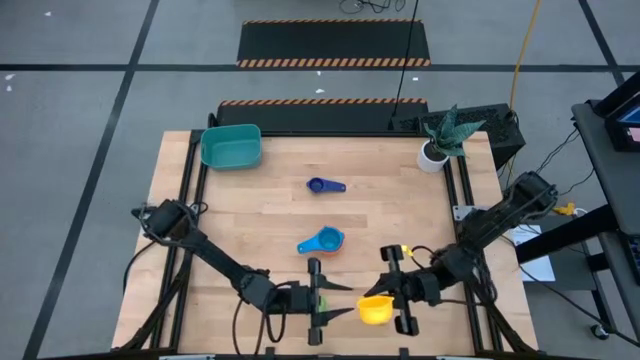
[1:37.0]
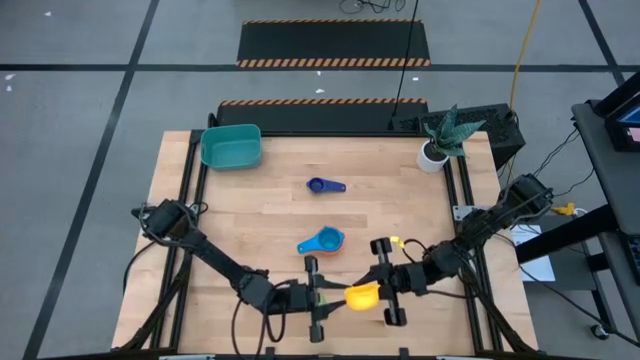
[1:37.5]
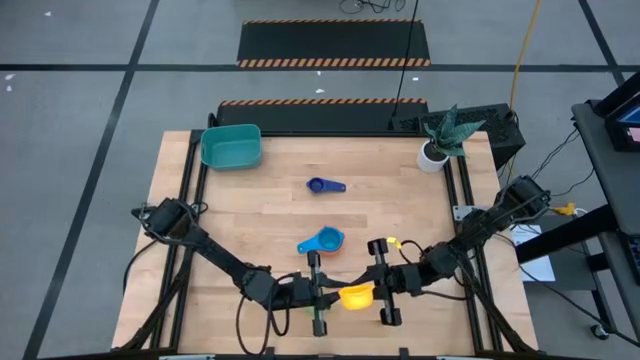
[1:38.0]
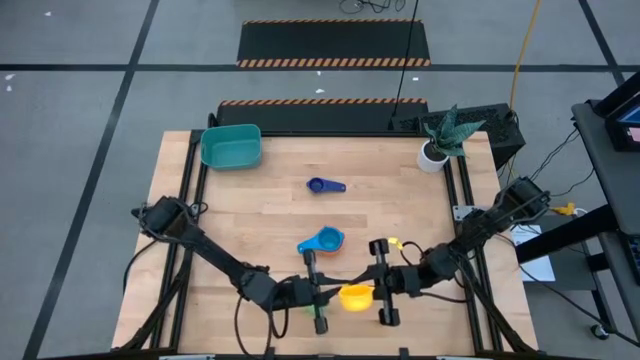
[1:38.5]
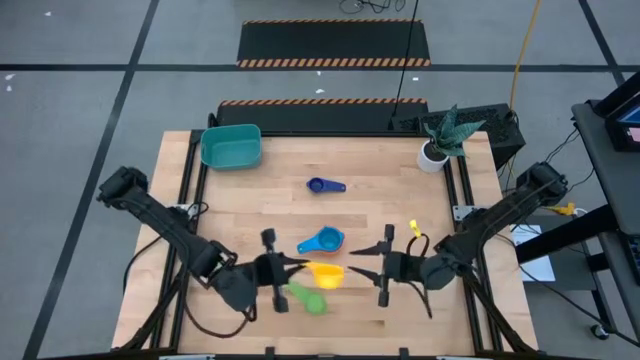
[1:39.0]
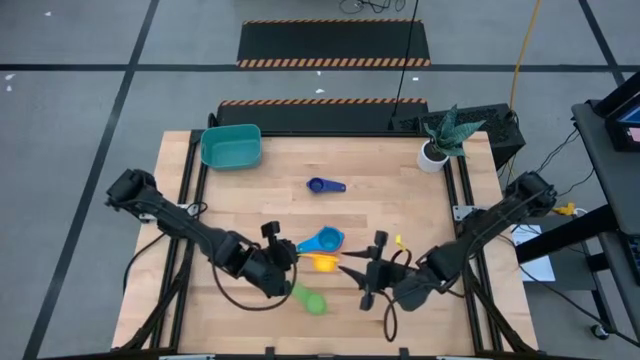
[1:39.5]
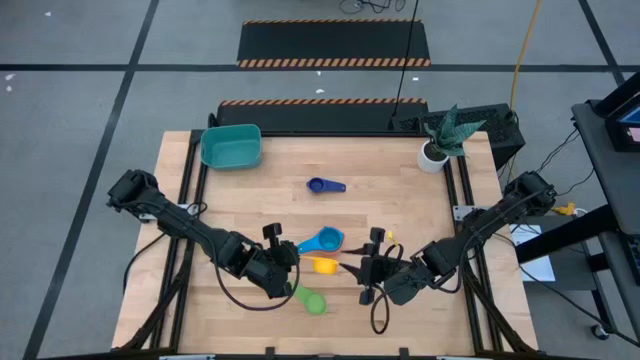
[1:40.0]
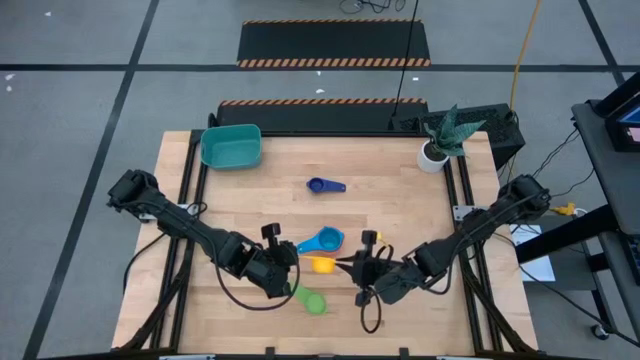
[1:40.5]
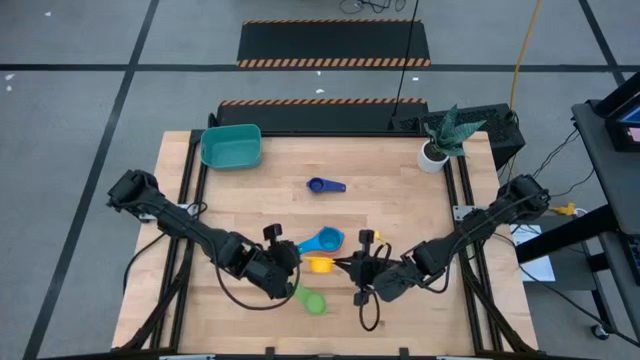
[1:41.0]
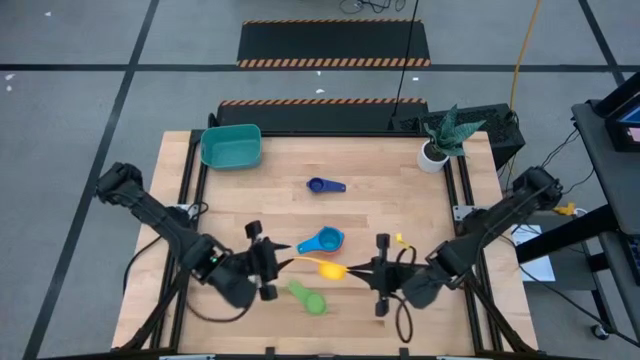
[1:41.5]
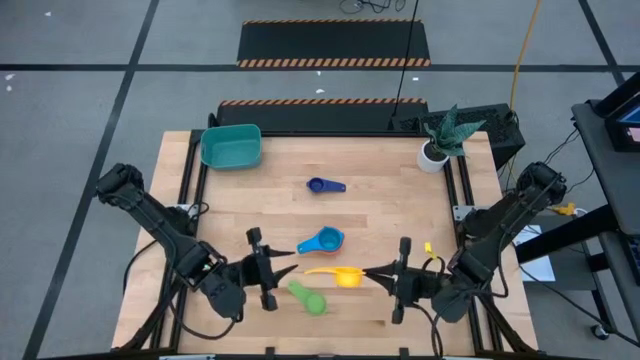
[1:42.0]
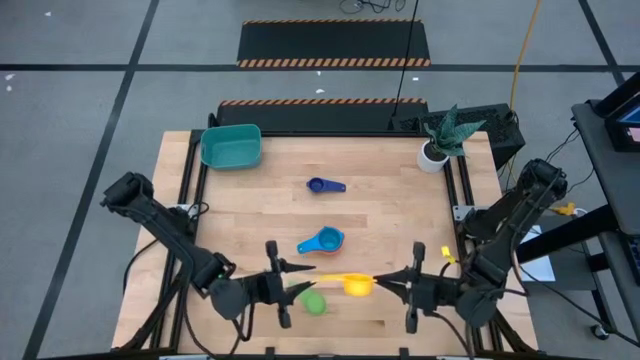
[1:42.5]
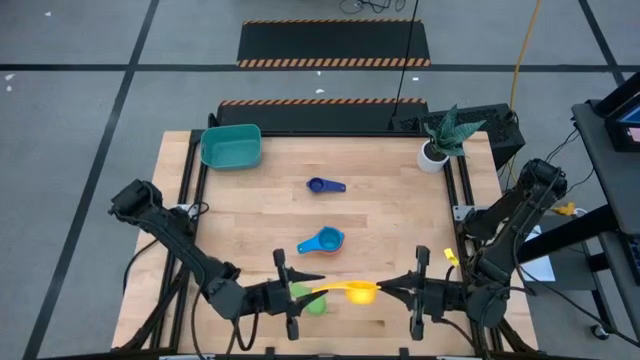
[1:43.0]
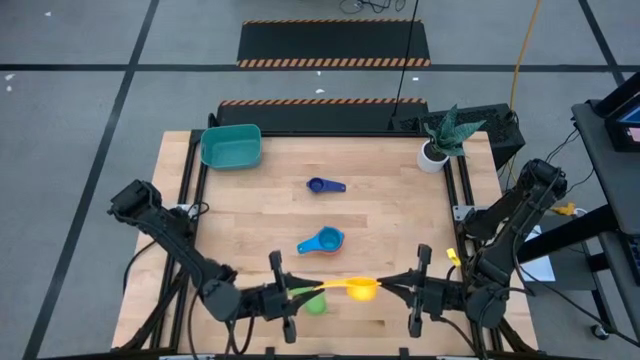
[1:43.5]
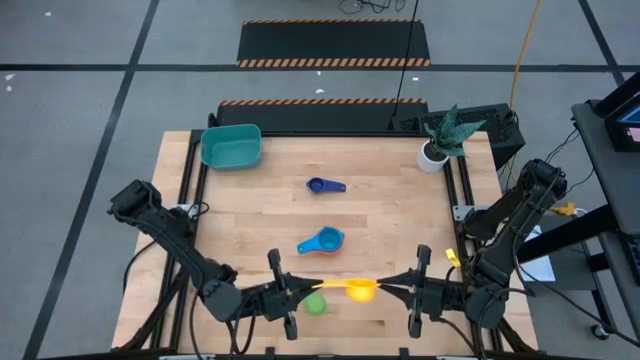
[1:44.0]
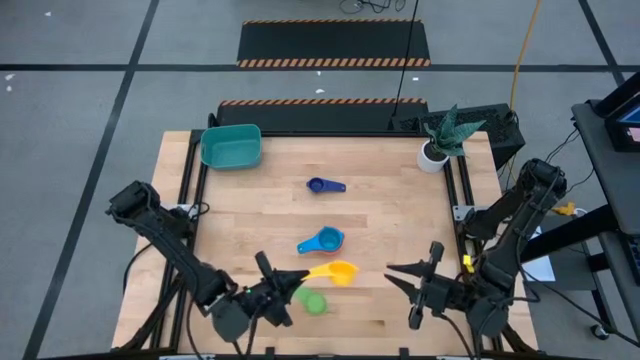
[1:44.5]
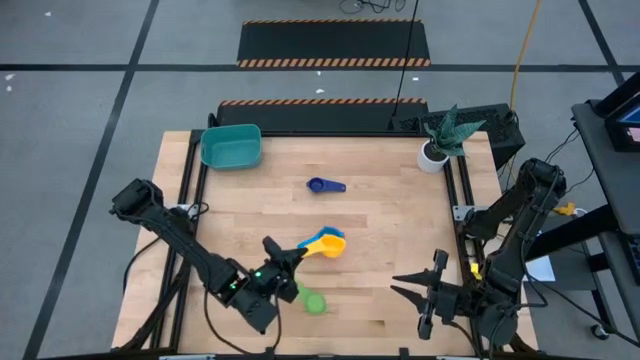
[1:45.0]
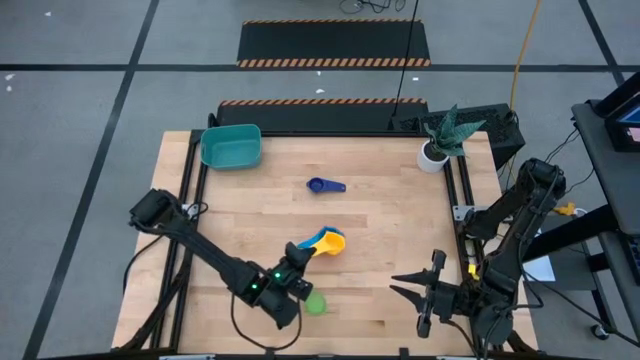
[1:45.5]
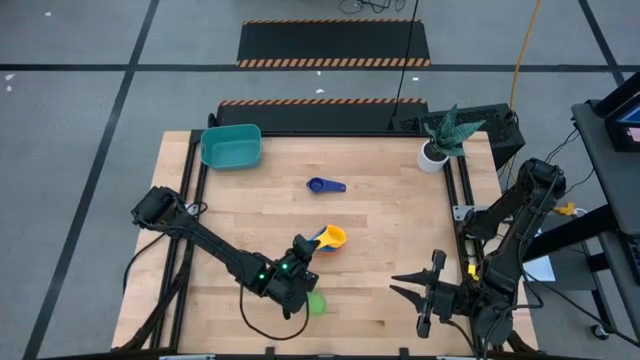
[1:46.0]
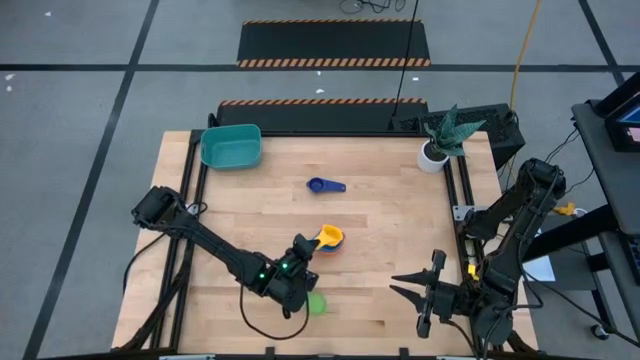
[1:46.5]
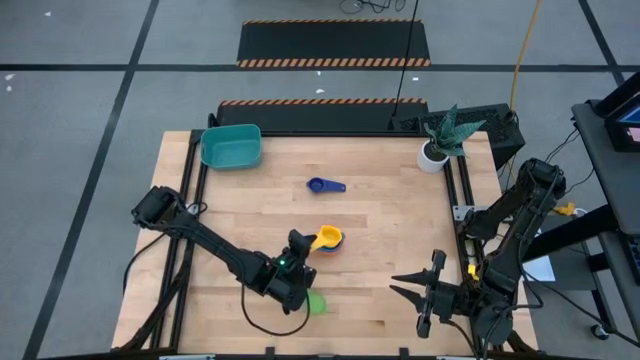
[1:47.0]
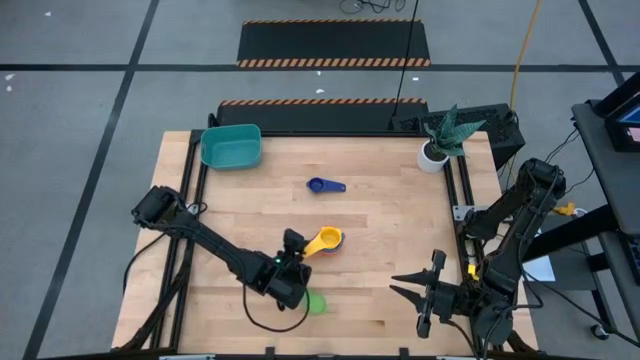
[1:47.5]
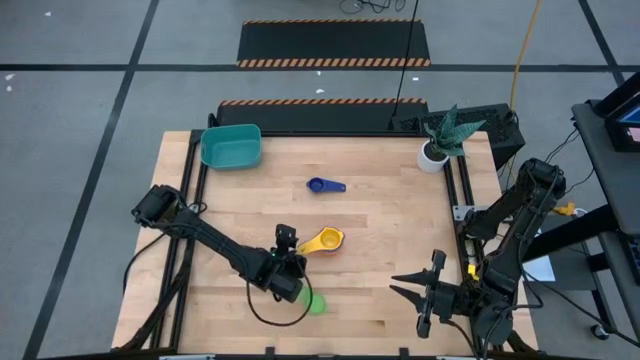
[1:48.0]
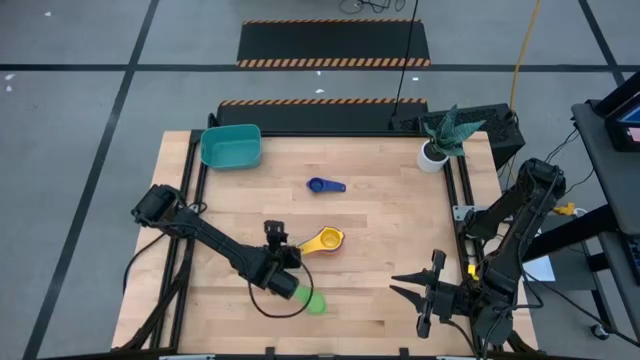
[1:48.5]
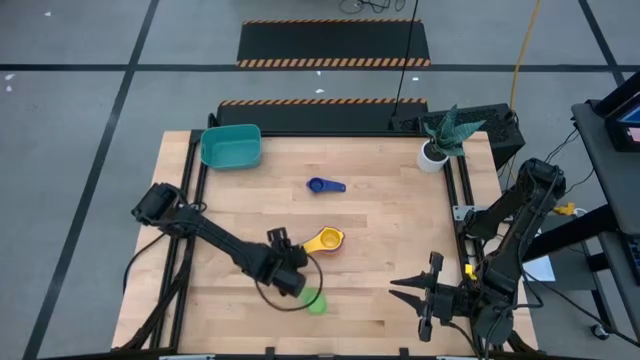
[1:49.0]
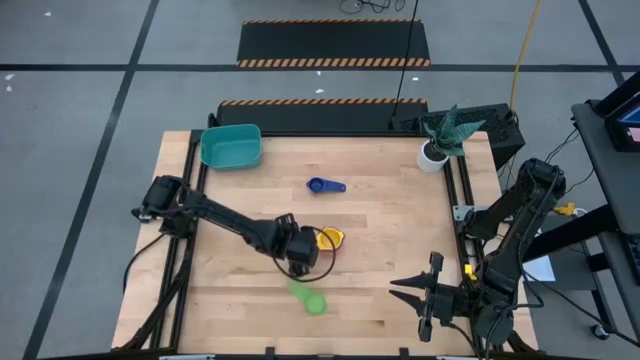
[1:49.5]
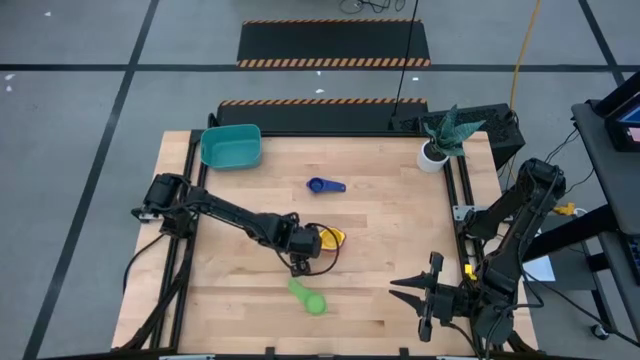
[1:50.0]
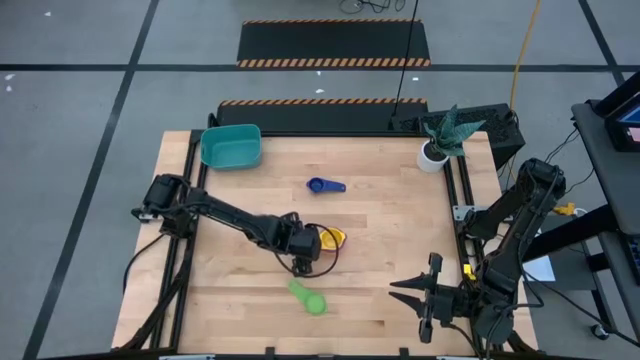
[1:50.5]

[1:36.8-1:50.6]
Task: Nest measuring cups in basket
Stack the yellow measuring cup on top of the light blue measuring cup

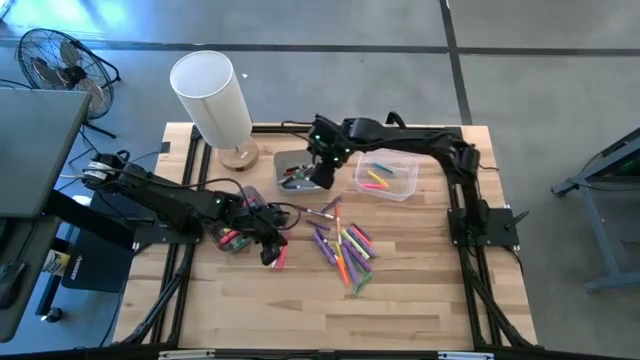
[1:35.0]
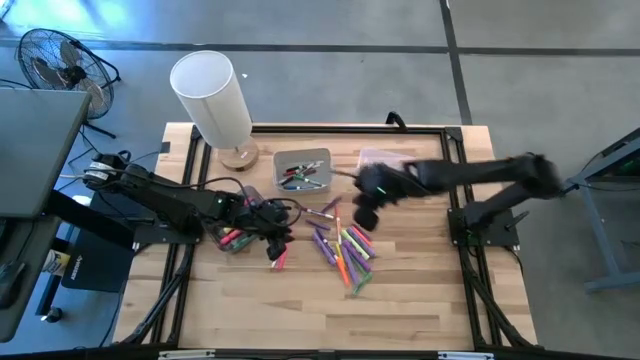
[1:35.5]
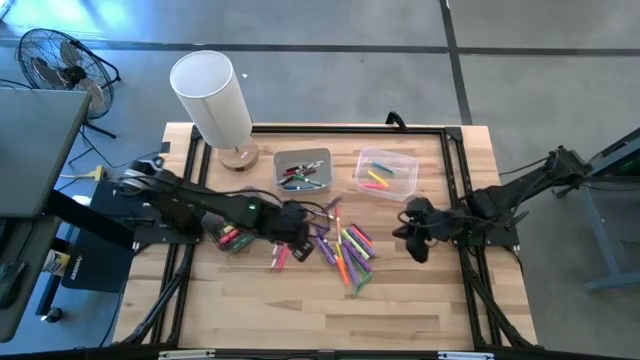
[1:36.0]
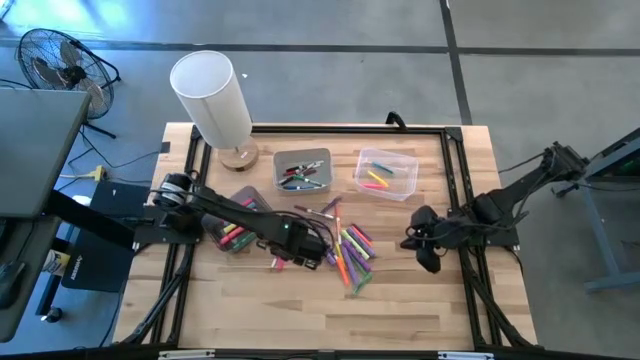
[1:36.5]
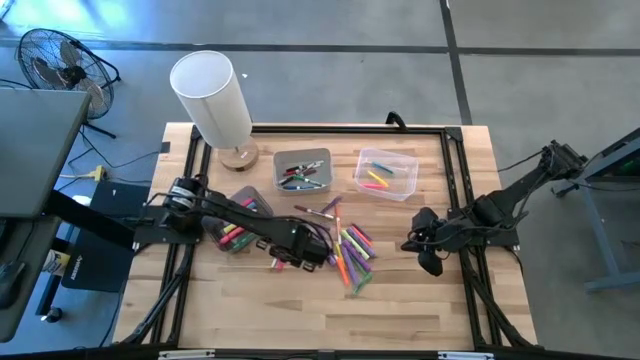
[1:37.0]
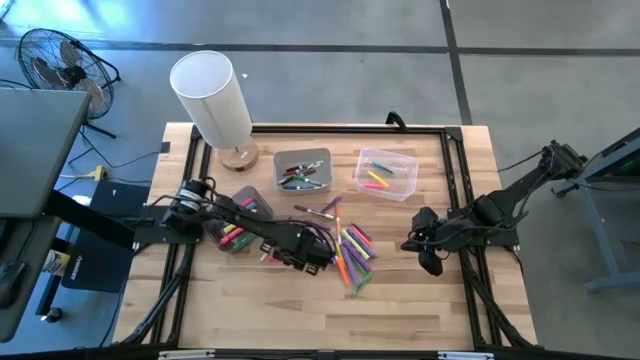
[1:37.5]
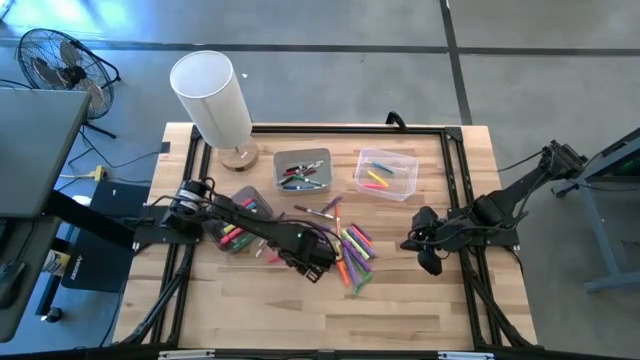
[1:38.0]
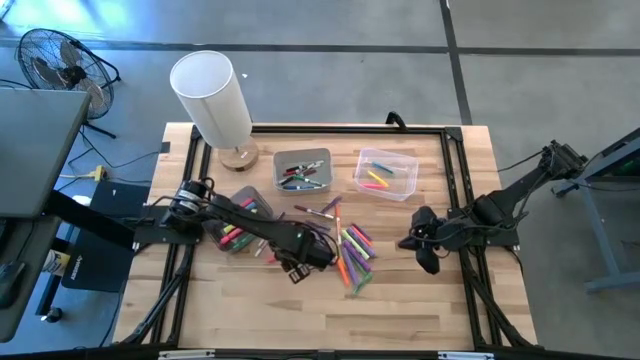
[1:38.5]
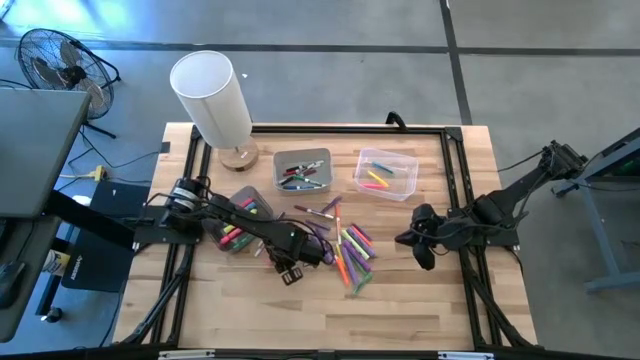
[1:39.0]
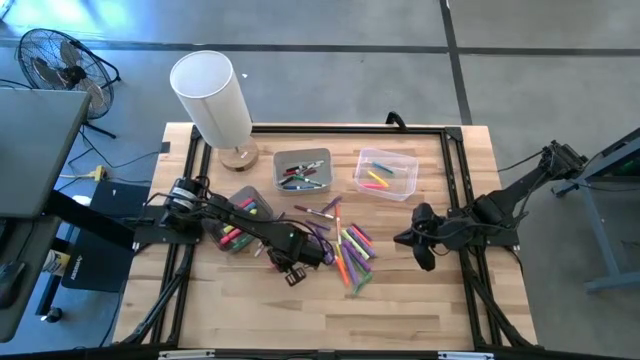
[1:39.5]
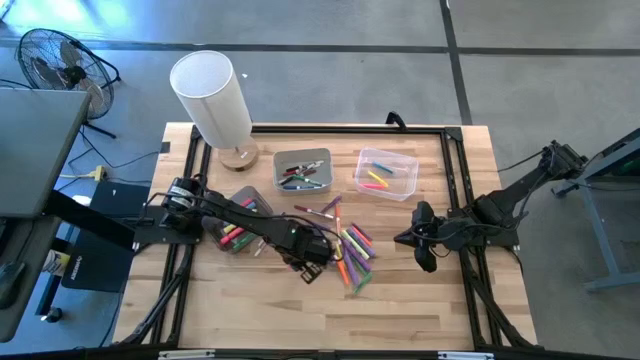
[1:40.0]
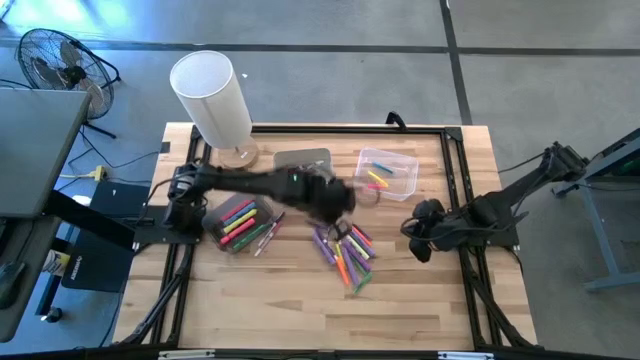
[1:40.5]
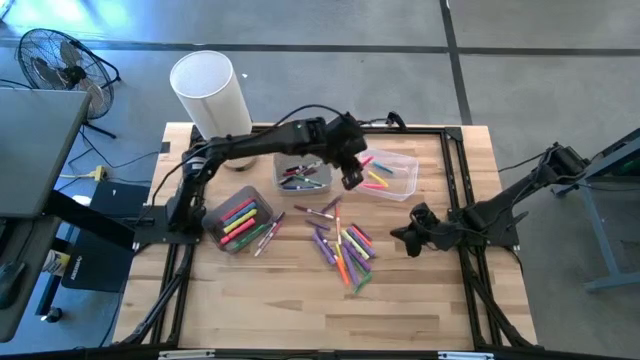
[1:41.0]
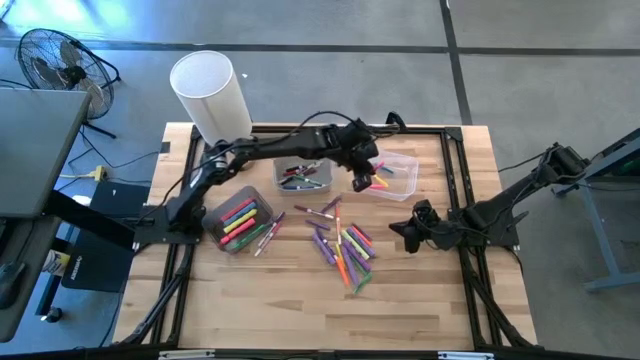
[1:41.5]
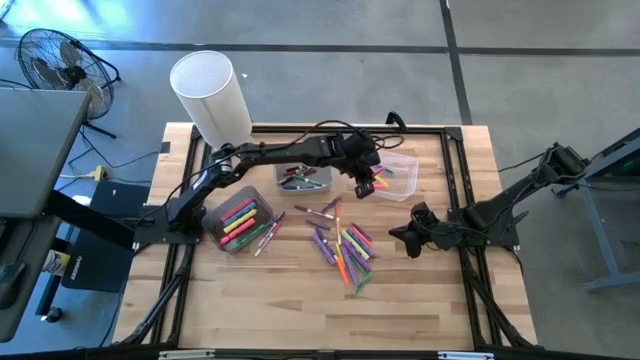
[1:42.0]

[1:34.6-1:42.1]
Task: Pick & Place Markers
Put the pink pen into the transparent bin
